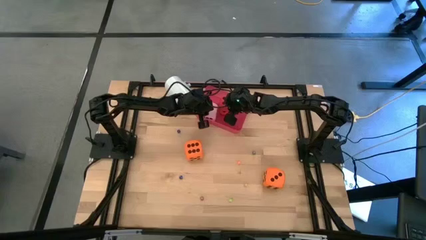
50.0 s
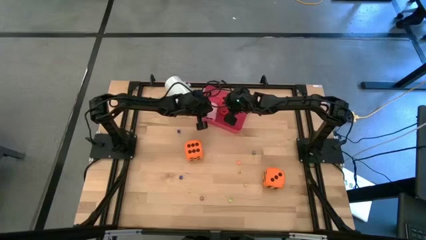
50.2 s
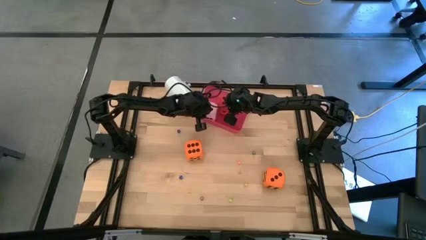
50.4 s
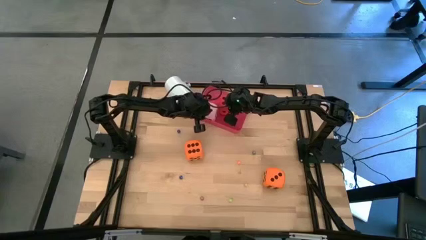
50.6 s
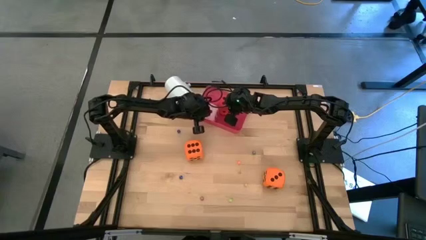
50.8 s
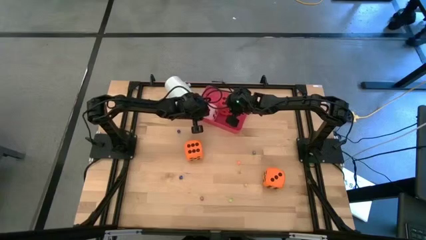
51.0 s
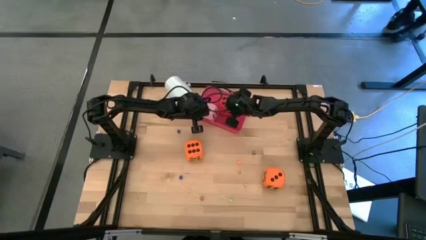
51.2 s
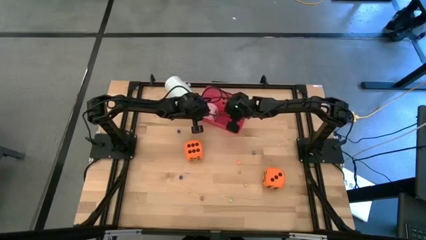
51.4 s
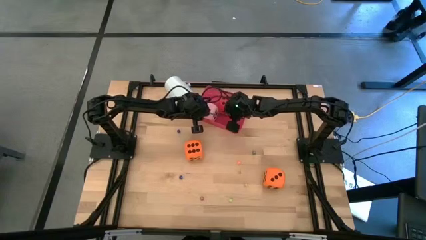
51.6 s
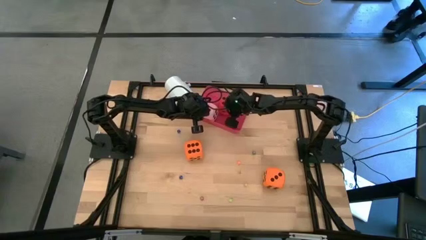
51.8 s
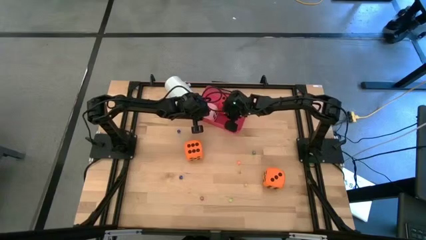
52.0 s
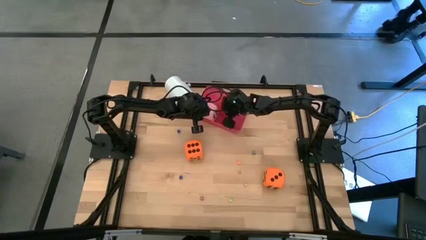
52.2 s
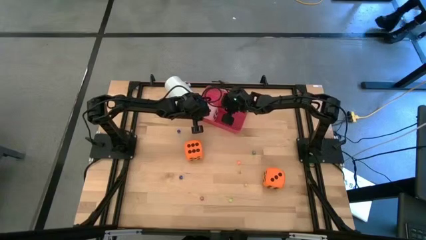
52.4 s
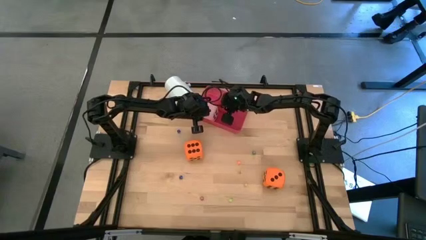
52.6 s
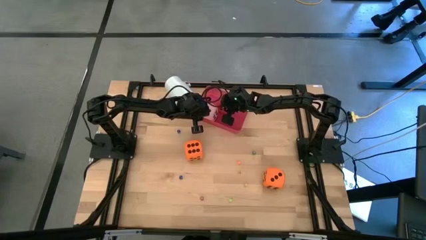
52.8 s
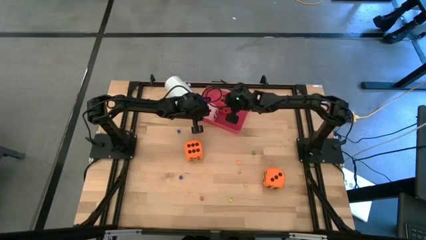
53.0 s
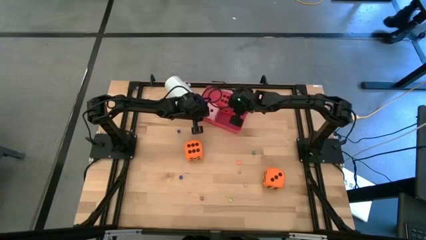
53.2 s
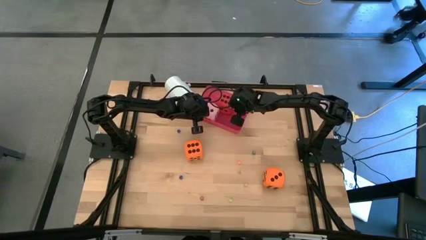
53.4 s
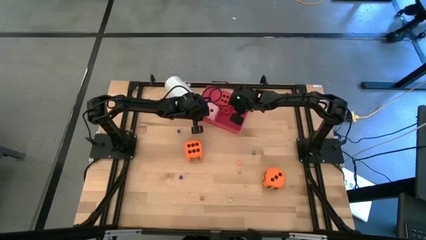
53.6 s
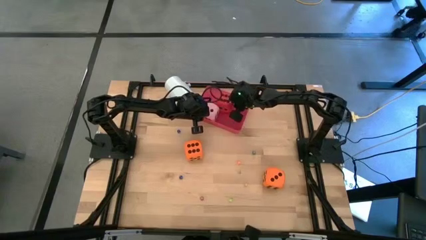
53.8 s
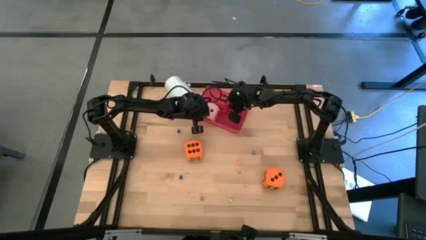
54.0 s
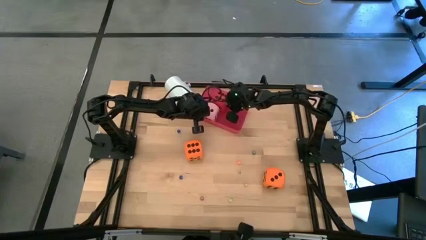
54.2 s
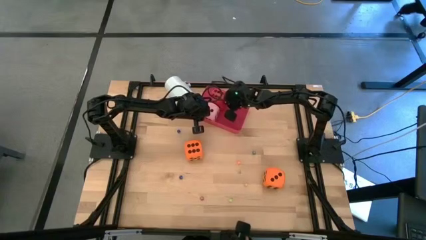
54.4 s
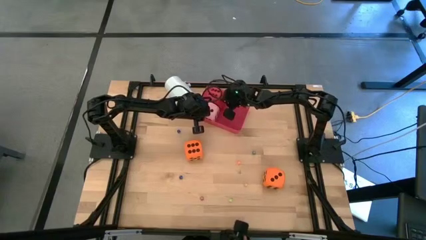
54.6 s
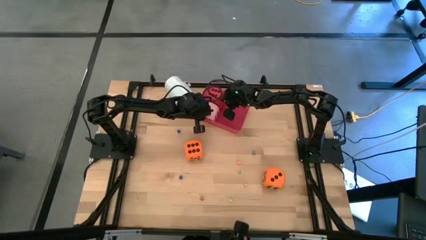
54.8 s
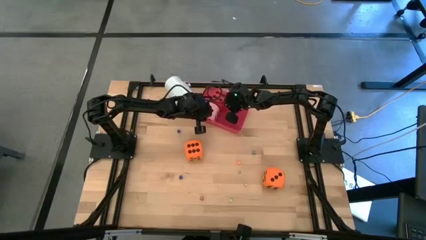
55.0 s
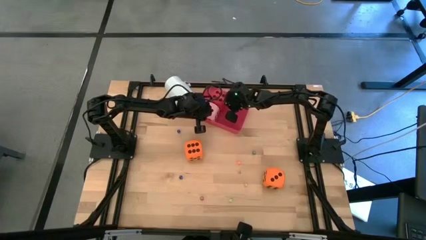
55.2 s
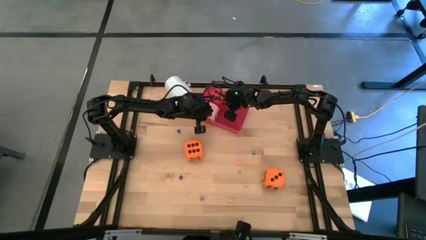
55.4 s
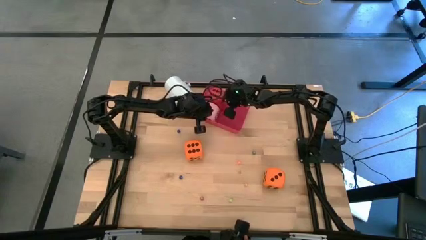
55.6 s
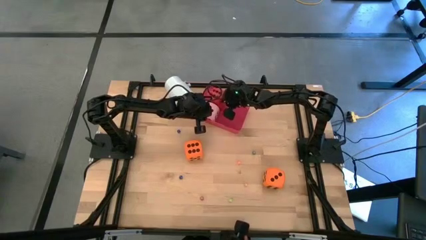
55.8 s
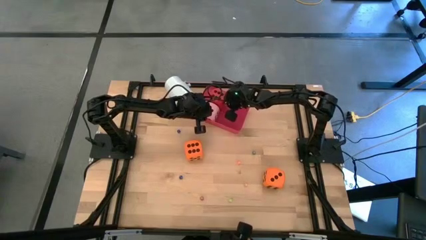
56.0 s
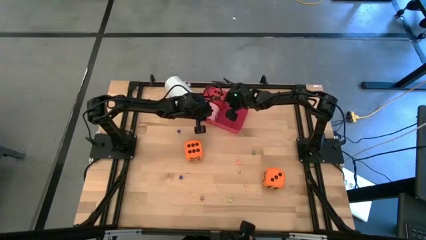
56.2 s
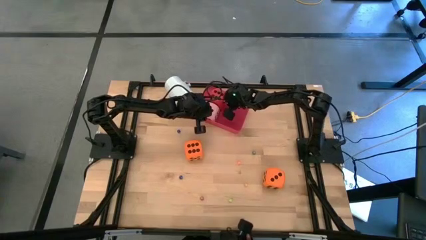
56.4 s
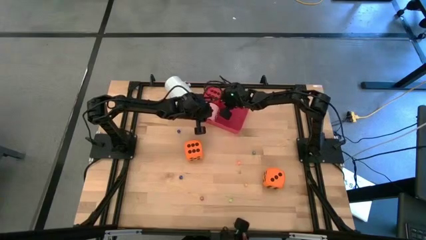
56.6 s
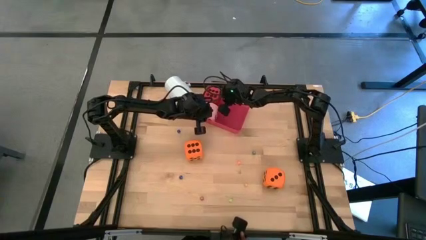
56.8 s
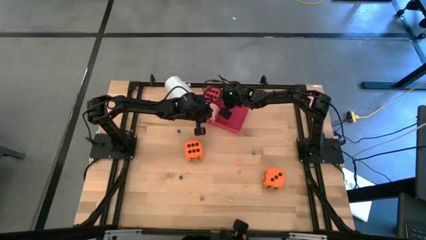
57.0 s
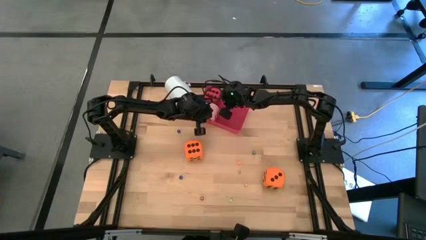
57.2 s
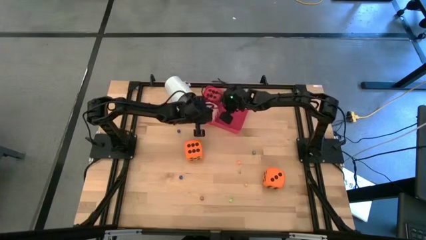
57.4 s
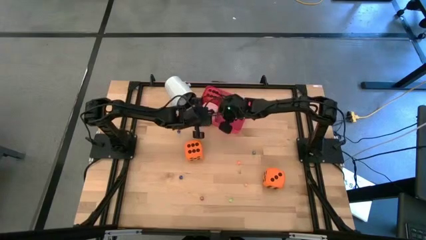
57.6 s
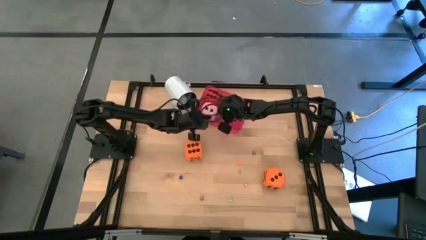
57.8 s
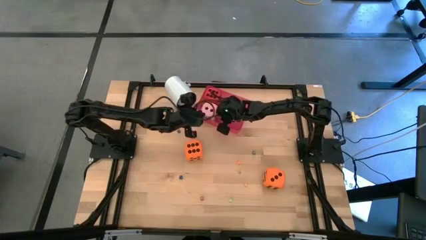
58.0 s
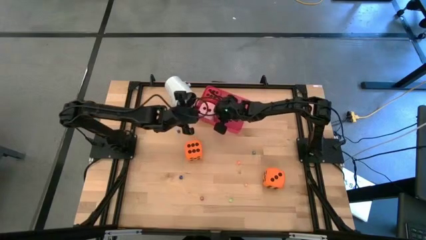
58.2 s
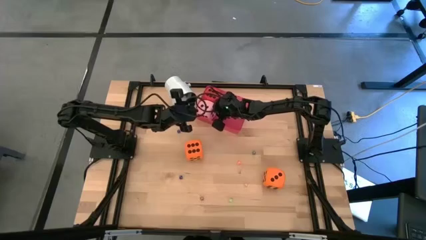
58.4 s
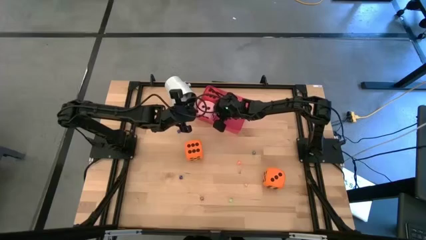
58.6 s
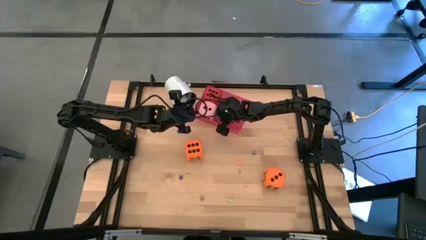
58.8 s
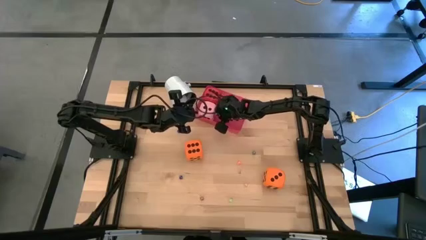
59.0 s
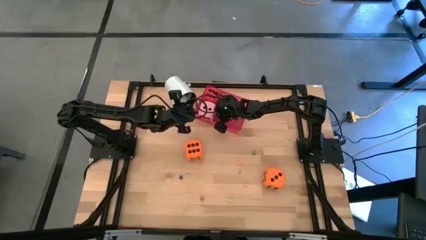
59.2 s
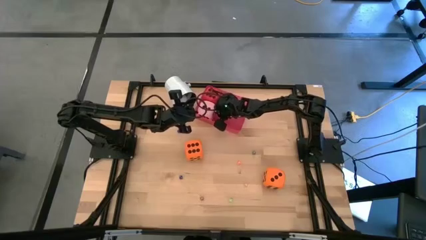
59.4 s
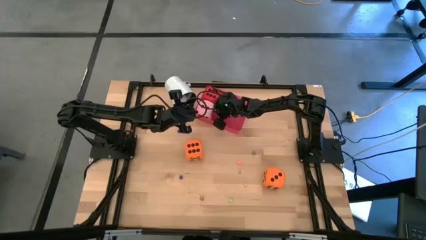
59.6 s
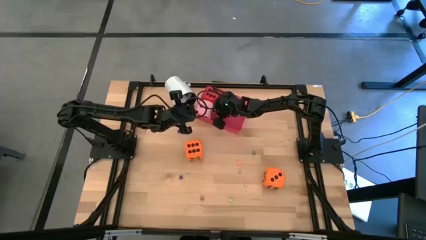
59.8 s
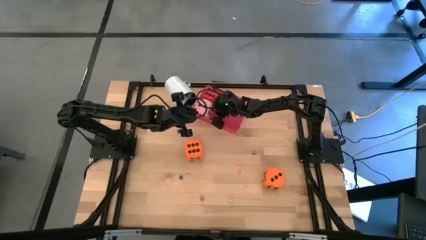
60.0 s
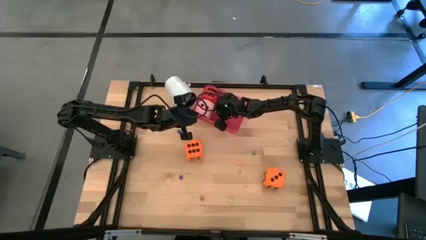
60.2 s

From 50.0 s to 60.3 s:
Task: Pick & Place Dice
Adjust the big dice

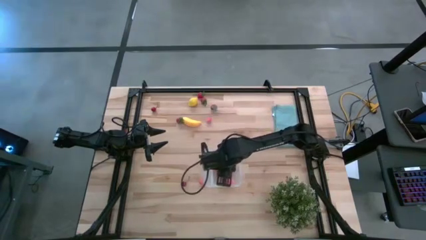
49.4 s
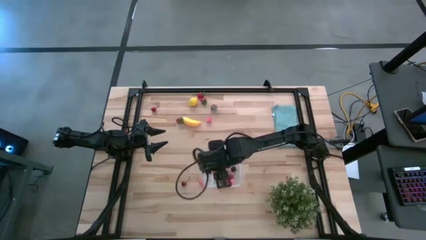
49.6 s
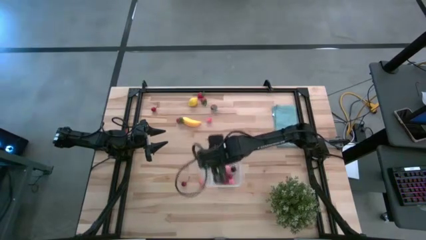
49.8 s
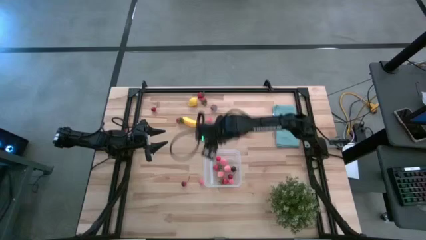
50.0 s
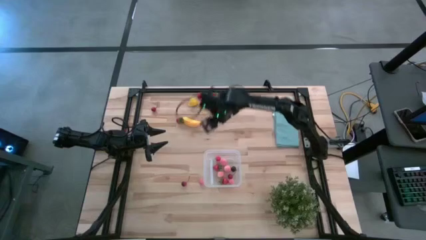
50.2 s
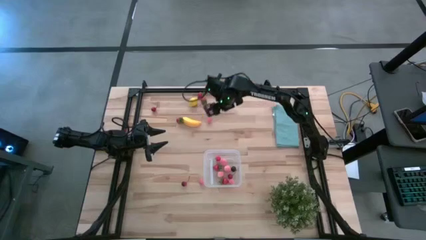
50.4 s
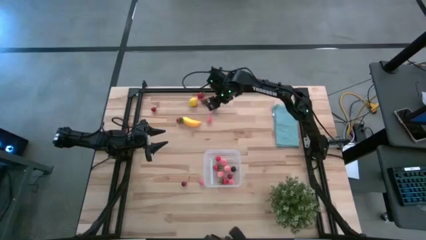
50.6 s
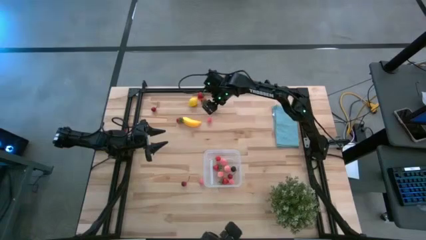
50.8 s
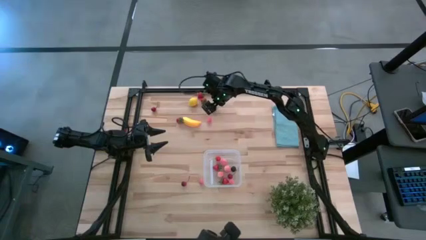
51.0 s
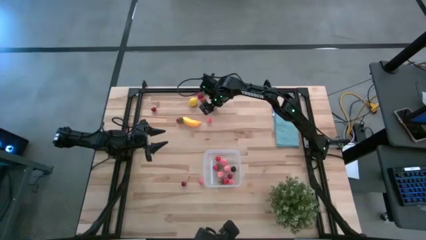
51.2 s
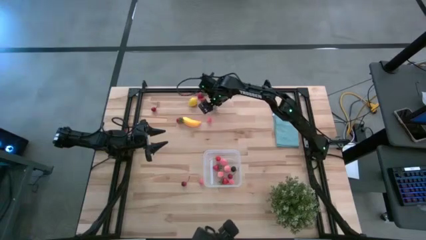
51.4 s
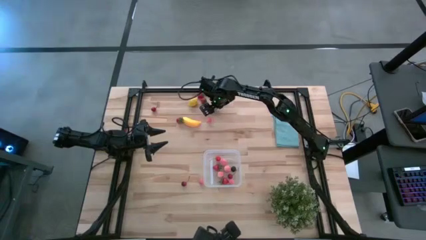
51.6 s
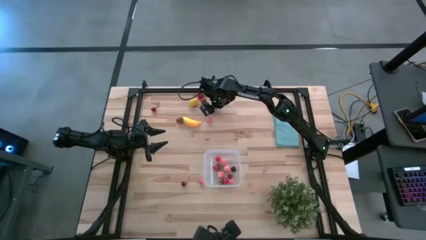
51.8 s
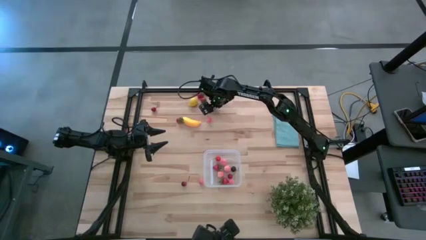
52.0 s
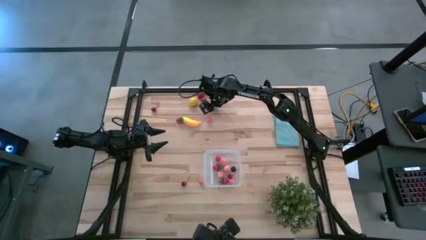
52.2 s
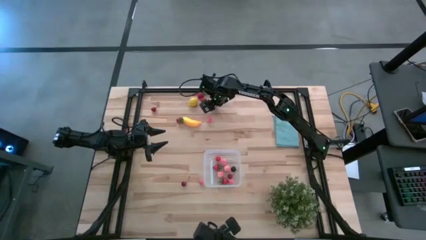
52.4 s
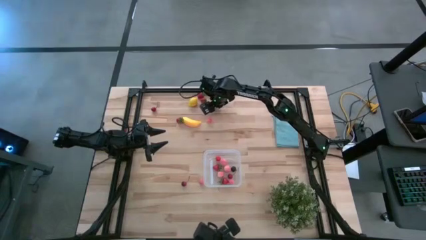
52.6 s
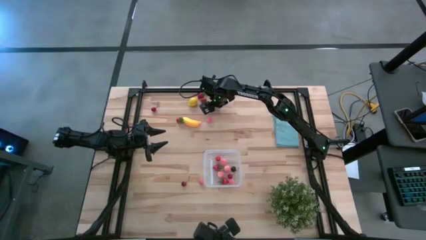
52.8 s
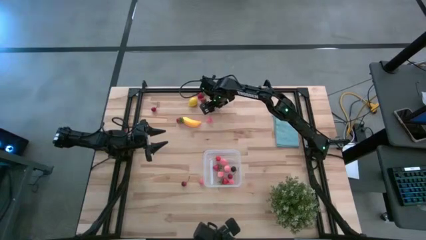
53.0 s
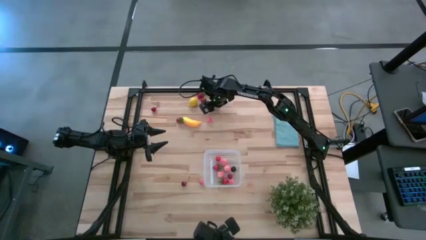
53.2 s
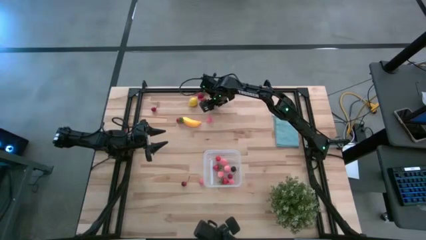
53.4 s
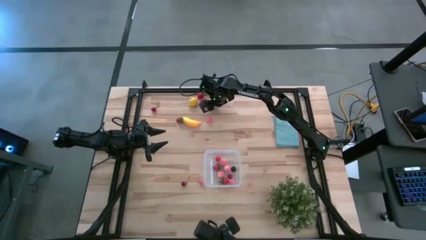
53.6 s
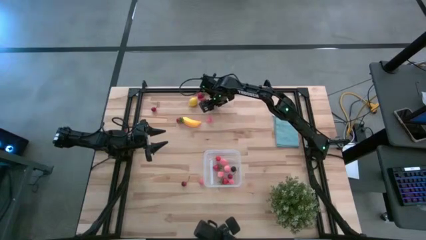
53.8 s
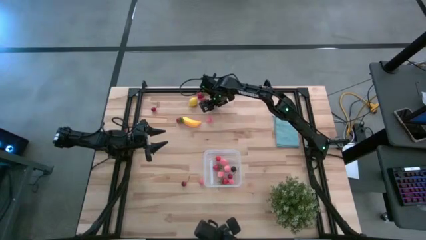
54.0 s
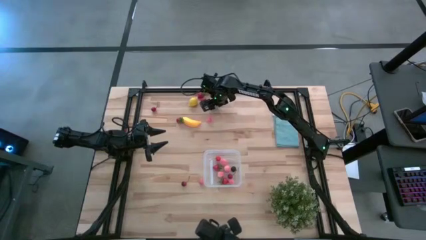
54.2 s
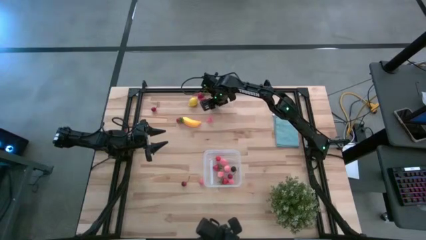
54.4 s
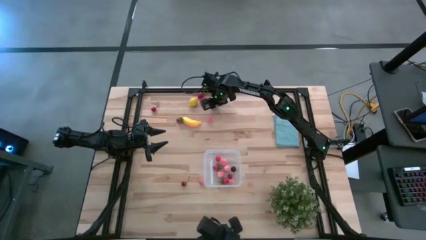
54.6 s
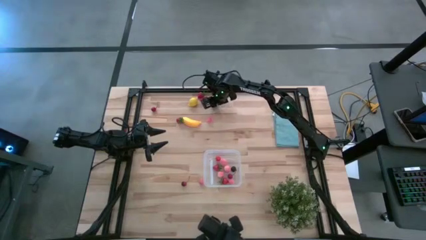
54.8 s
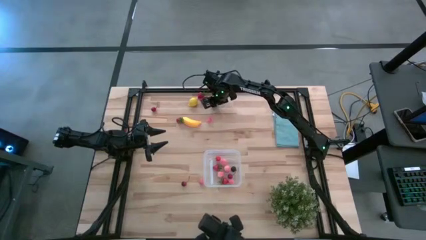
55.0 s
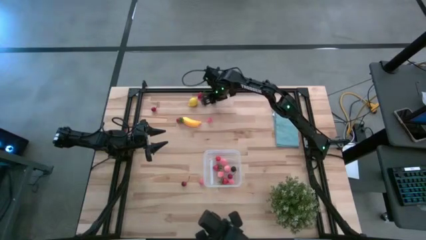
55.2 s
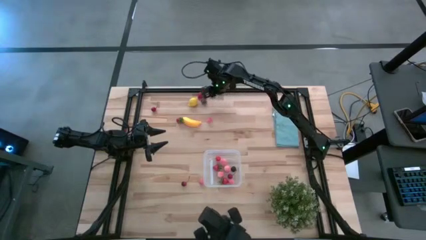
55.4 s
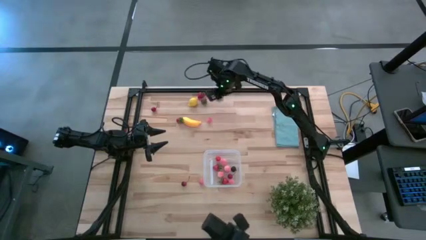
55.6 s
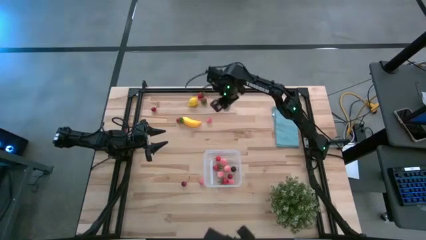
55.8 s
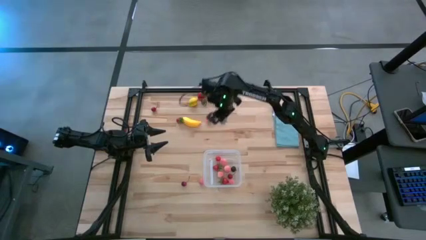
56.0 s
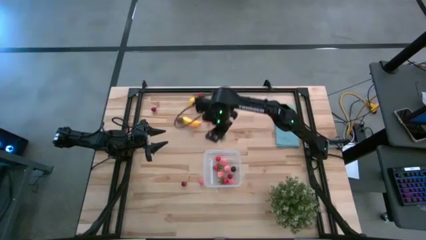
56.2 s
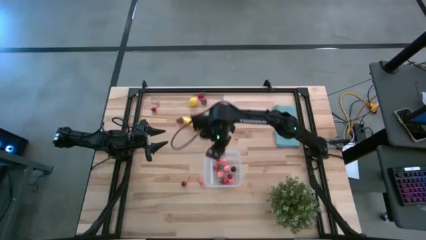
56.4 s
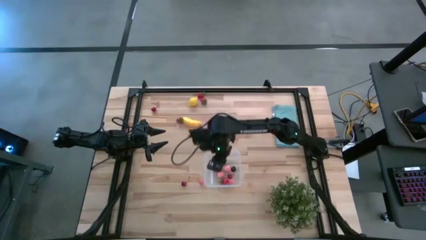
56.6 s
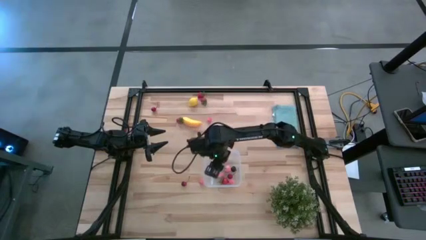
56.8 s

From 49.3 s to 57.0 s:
Task: Pick and placing Produce into tupperware
Put the red strawberry into the transparent bin
